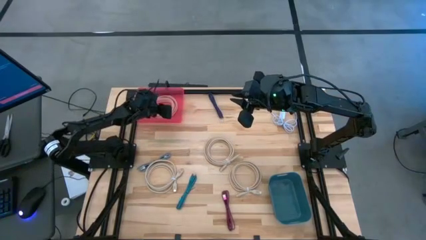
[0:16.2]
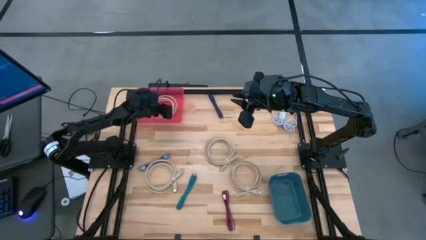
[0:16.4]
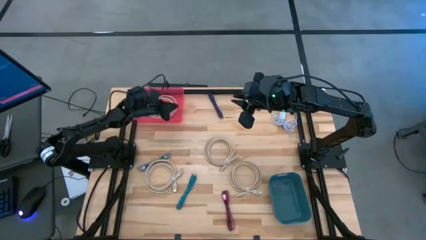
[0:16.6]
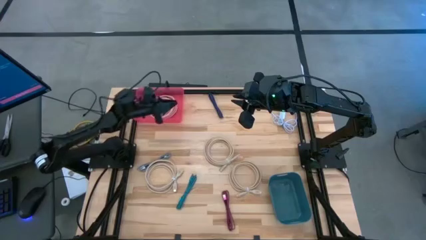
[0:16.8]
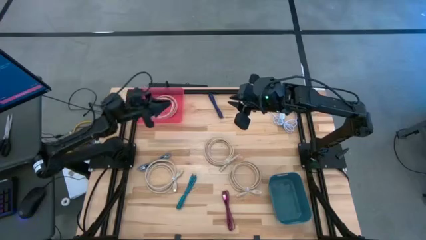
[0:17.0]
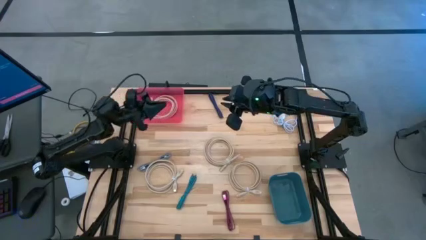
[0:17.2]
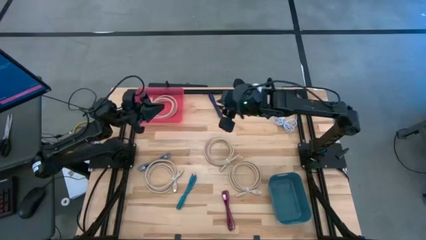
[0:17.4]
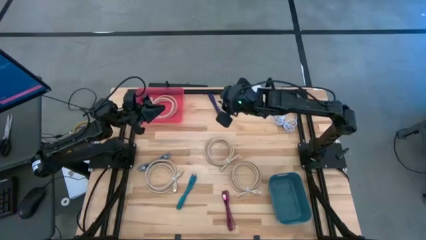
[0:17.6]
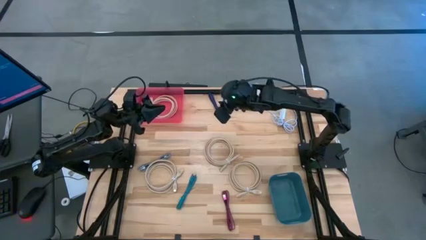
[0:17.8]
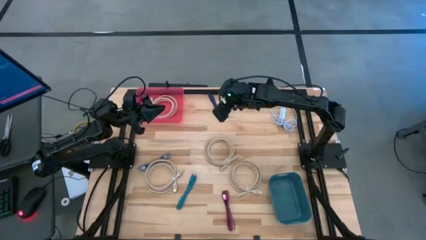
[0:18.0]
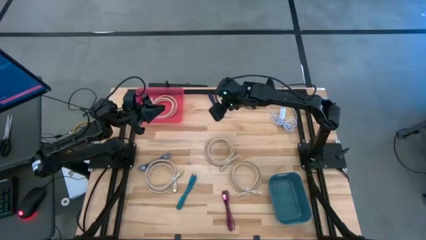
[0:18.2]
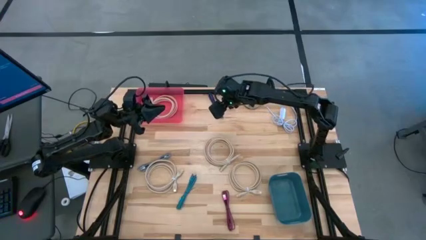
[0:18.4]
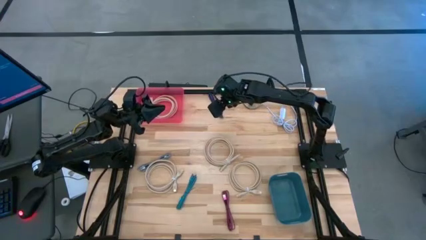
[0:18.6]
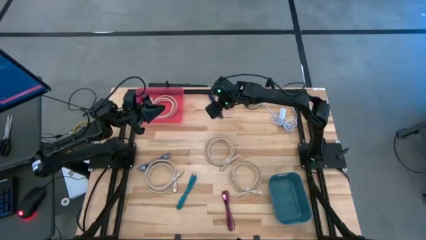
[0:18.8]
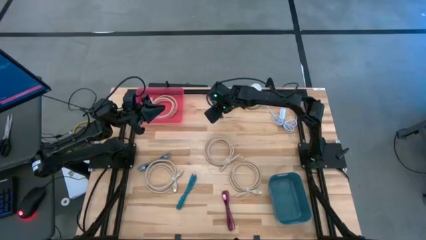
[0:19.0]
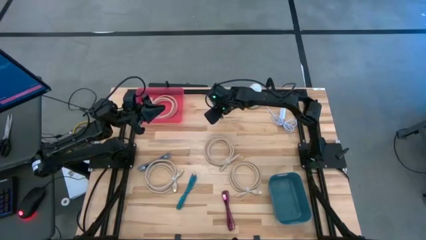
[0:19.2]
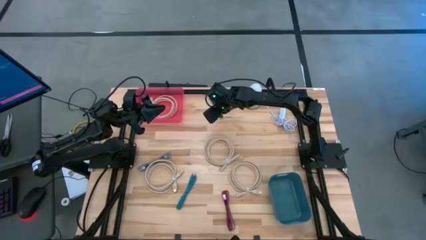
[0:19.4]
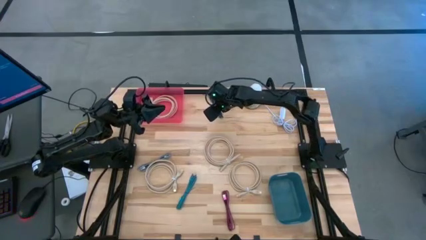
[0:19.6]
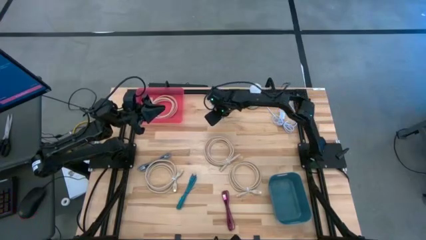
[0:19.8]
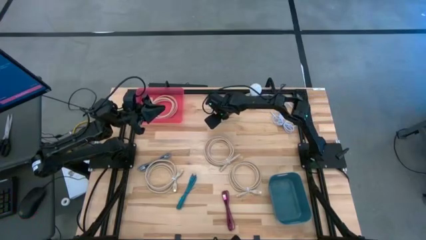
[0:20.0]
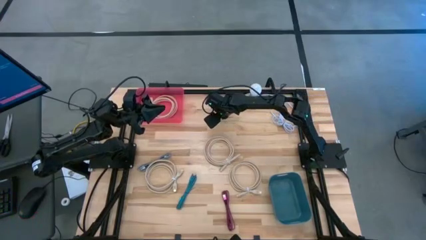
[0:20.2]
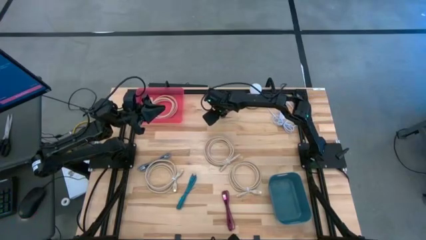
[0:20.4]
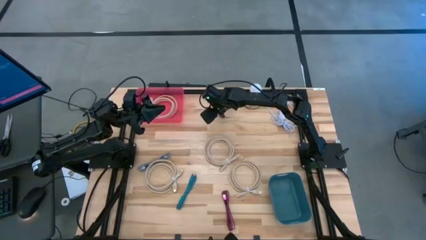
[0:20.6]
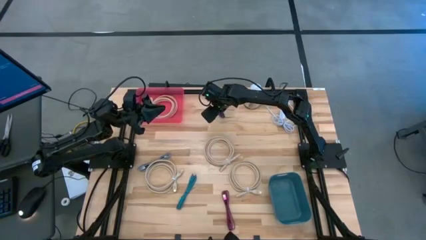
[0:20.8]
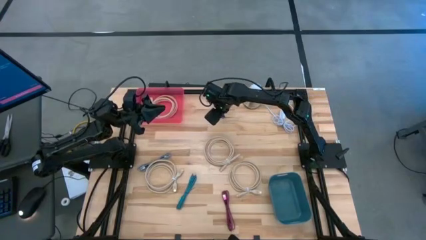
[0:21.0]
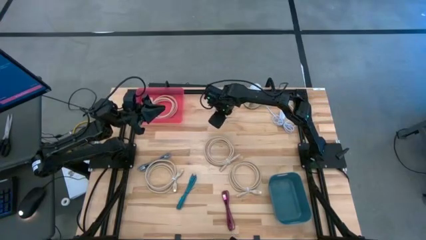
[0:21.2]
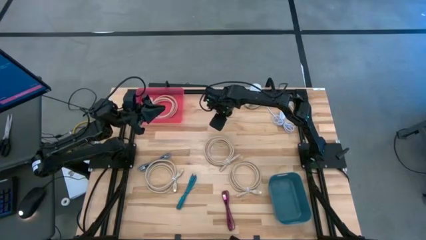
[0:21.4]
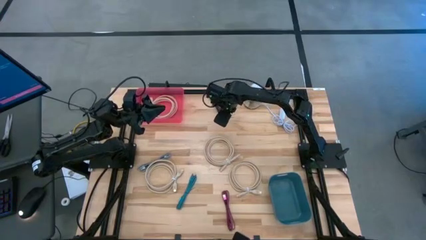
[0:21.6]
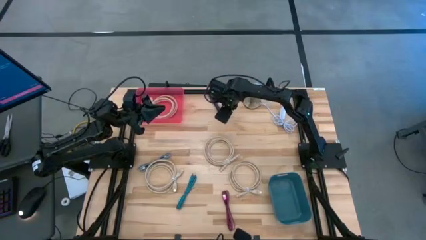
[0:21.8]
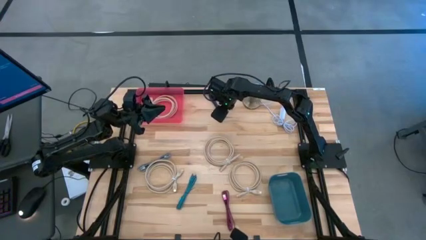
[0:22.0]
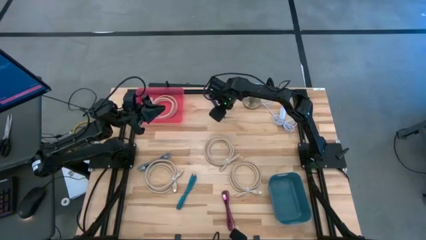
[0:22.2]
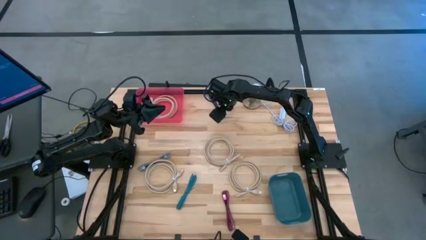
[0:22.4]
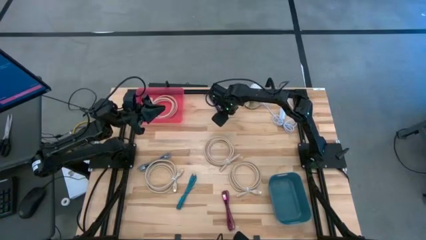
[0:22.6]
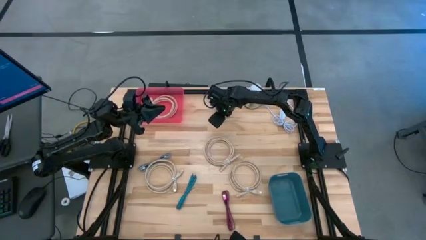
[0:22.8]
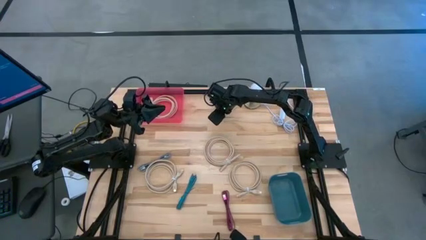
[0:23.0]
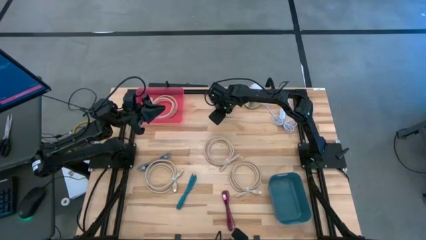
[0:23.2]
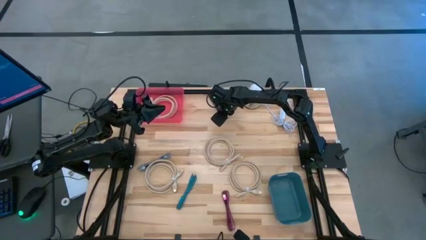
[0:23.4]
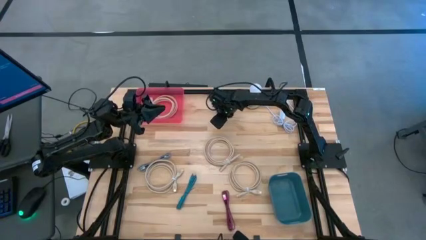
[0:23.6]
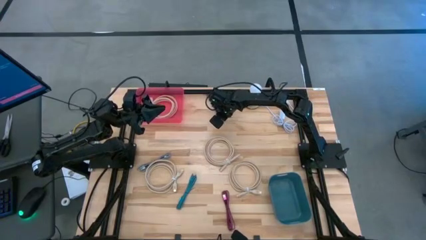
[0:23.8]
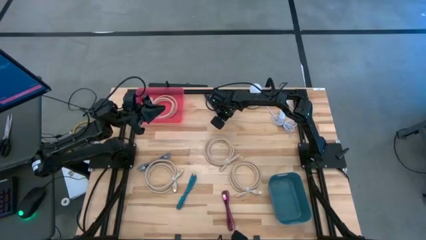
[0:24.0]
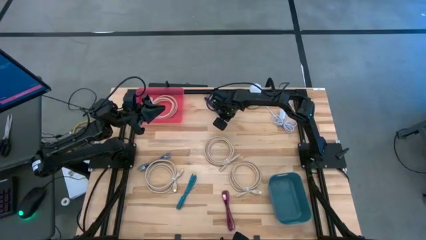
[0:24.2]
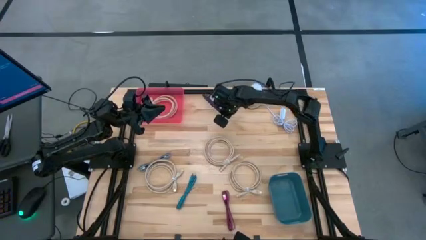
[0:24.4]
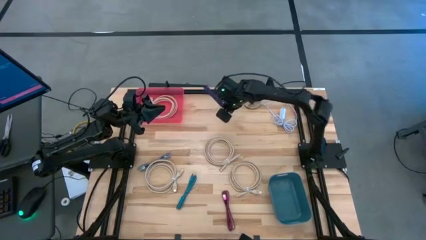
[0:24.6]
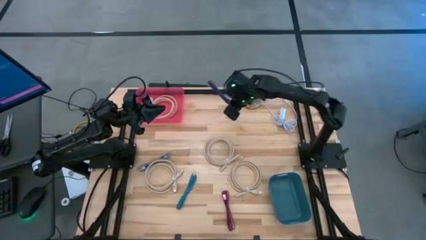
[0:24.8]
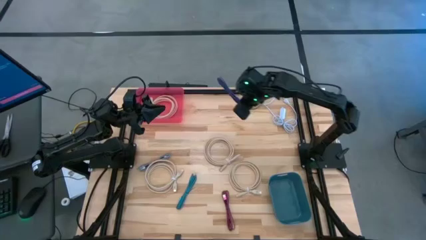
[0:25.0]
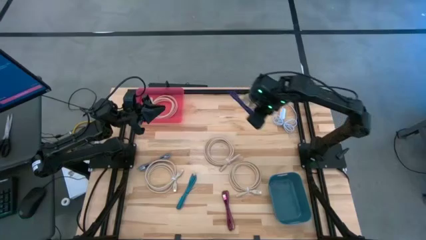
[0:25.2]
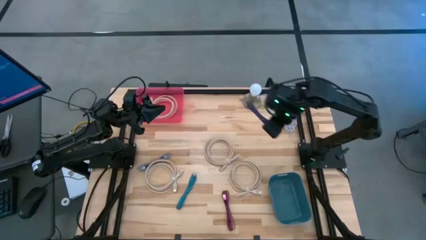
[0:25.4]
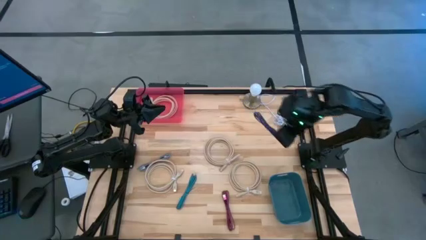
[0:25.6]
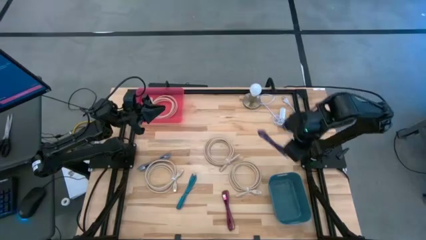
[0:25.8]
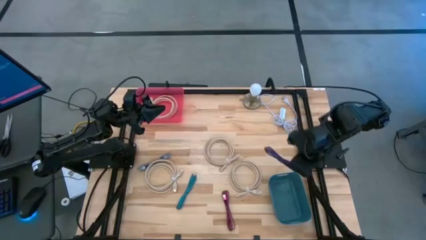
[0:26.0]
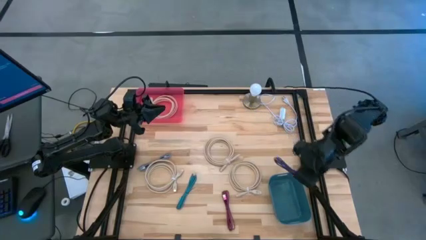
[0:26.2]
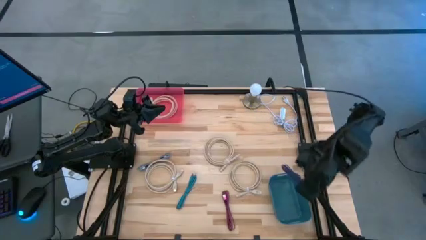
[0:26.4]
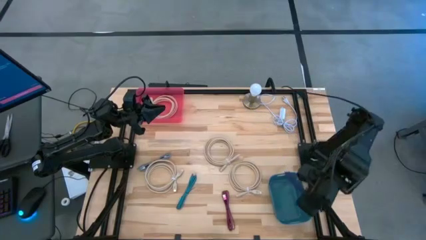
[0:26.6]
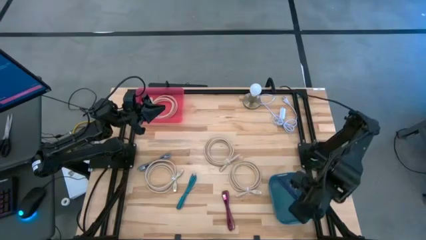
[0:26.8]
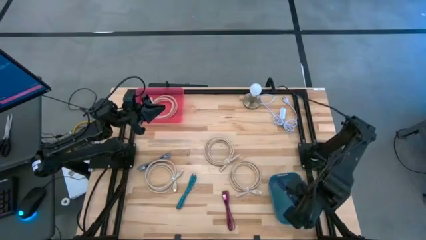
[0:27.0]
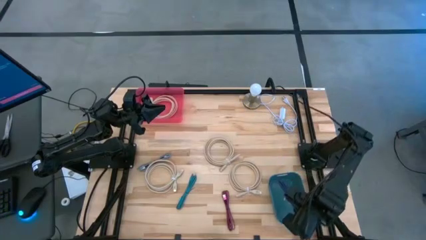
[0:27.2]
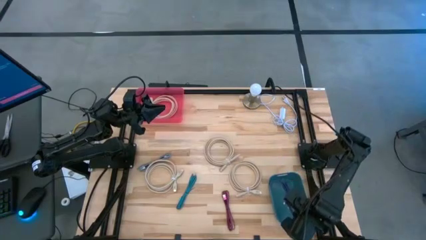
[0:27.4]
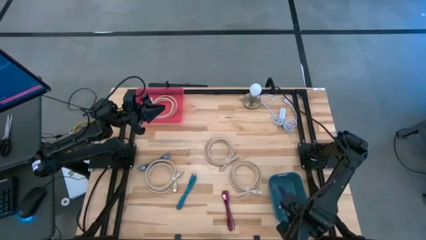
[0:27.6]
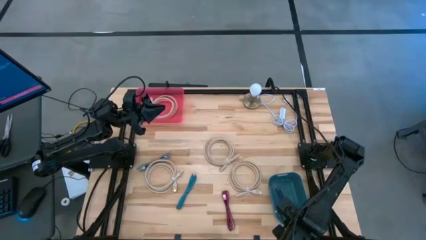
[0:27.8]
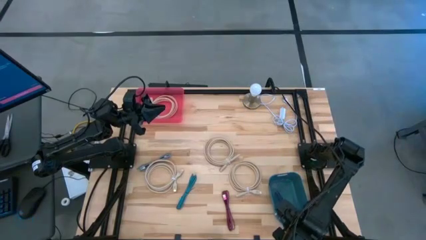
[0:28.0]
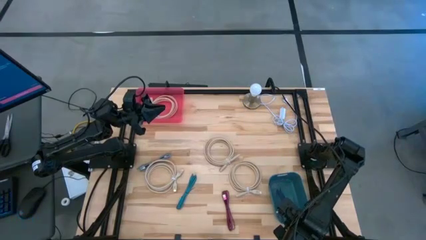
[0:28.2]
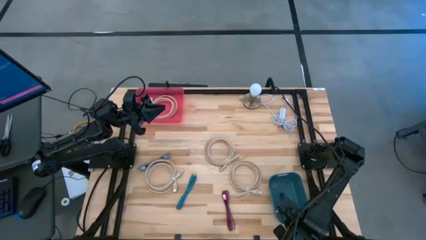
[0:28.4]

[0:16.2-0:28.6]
Task: Pick & Place USB Port
Put the violet charger cable into the blue bin

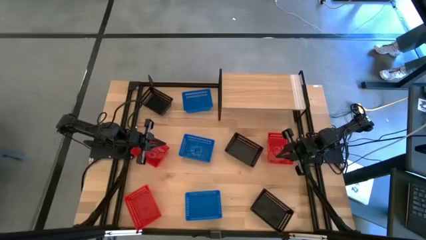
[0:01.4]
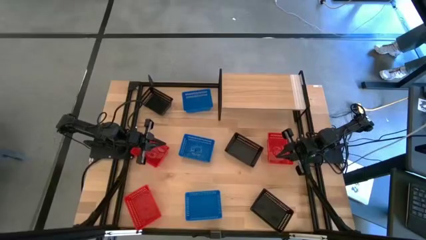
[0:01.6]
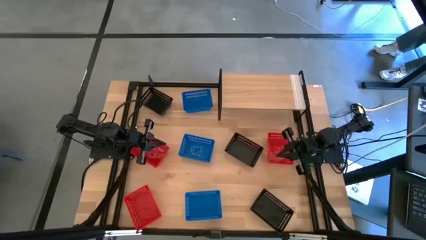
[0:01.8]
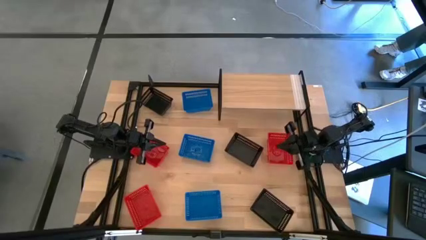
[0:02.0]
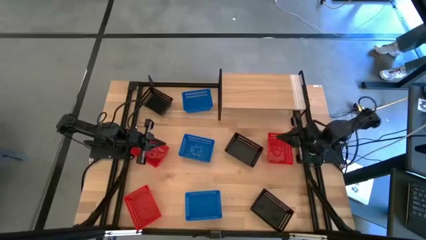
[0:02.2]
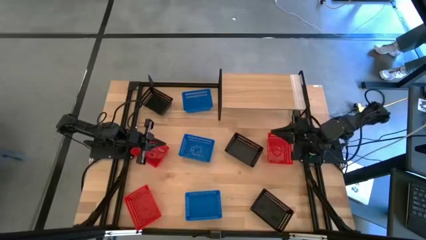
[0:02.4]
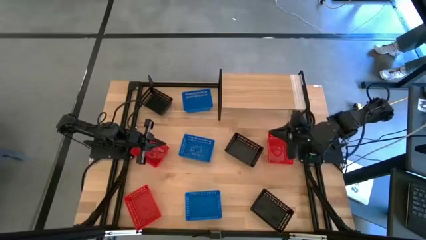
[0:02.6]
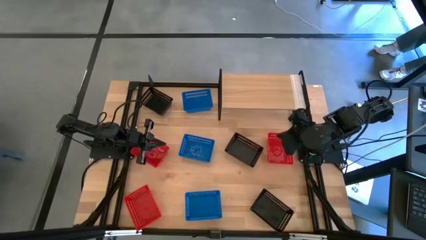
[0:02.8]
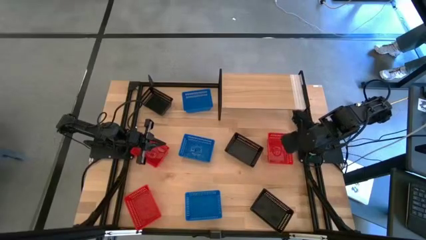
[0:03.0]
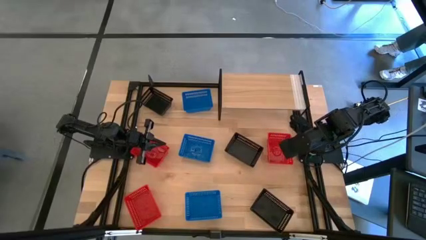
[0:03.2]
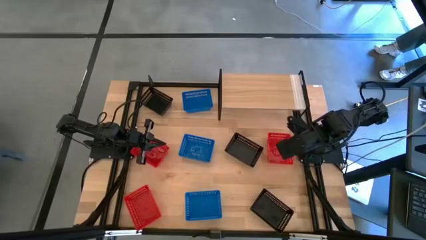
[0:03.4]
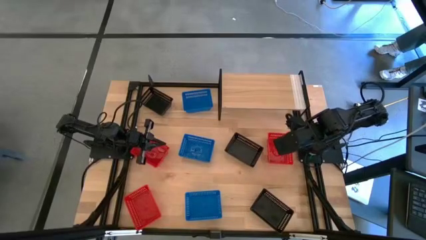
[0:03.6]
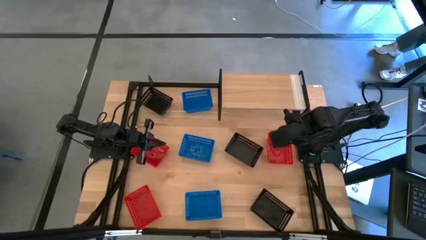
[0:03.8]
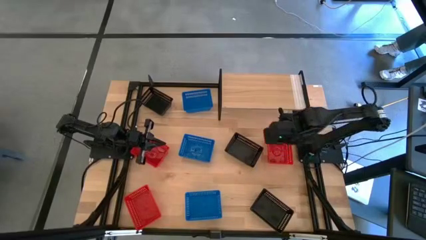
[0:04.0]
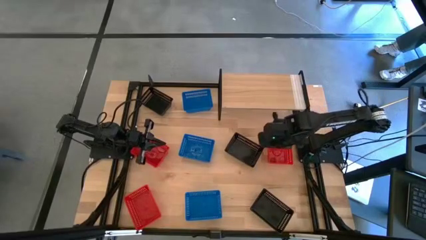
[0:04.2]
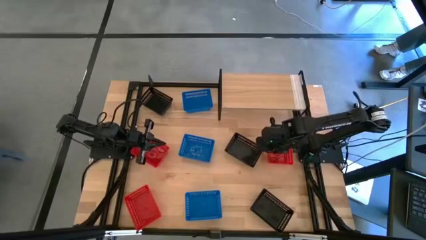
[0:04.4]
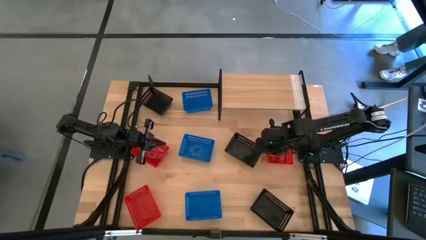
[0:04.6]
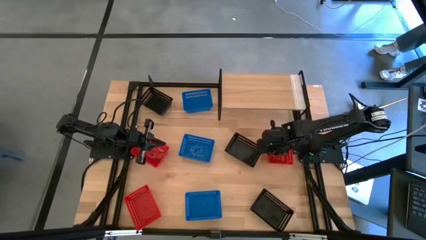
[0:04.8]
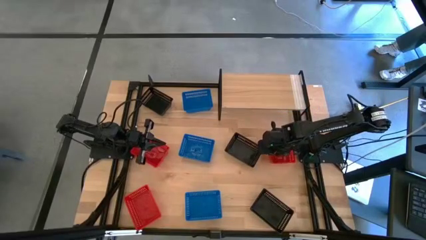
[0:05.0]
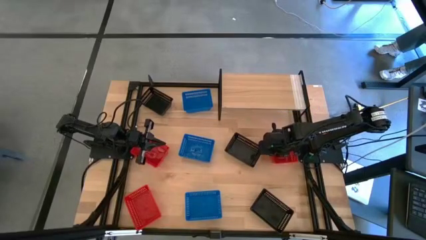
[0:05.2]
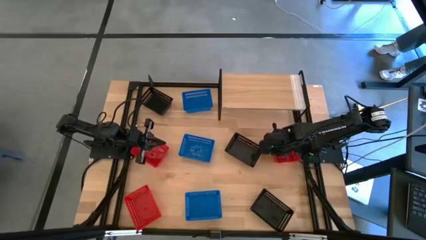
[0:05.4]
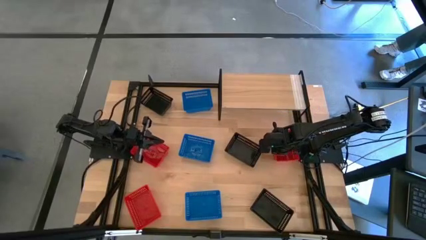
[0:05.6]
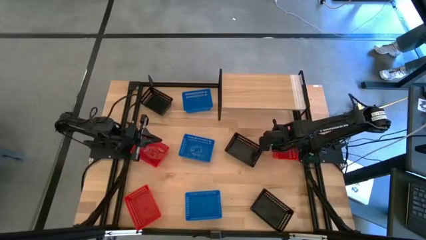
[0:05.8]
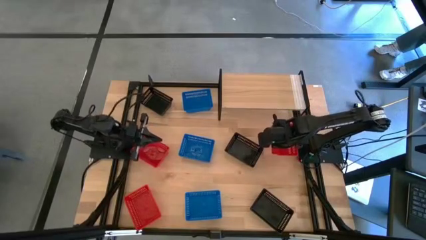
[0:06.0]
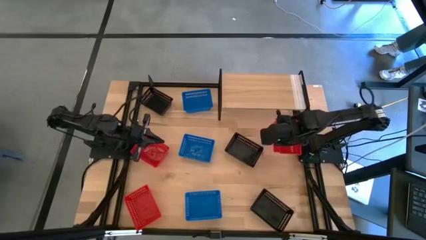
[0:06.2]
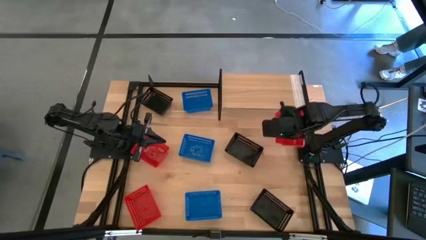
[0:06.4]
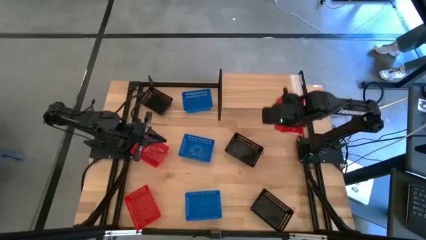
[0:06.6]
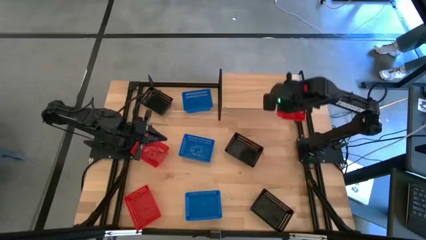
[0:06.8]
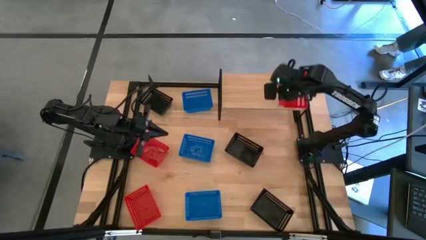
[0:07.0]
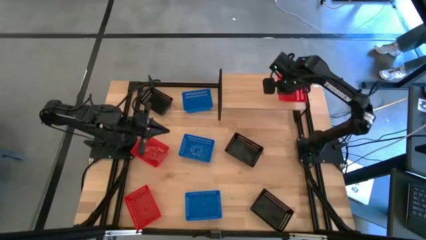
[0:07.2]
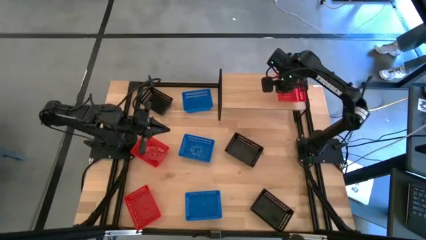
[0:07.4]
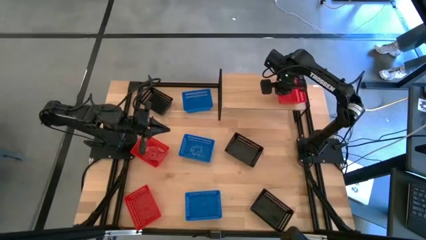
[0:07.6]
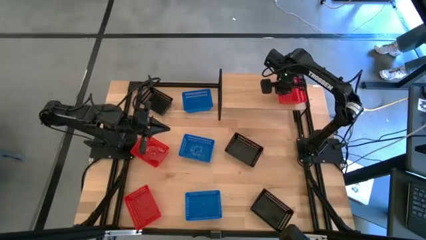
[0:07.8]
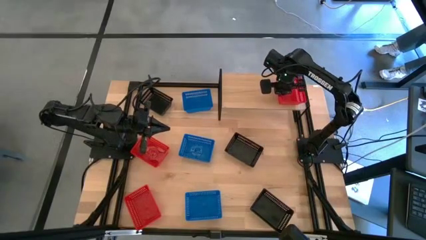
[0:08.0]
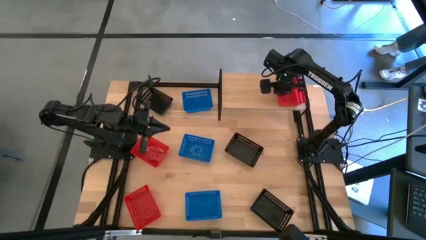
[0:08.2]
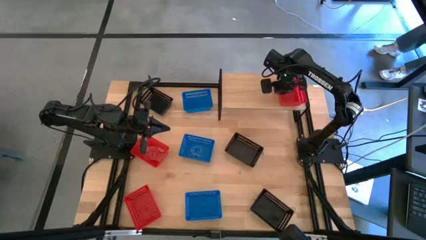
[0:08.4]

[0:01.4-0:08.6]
Task: Stack baskets on shelf by color
Put the top right red bin on the shelf
